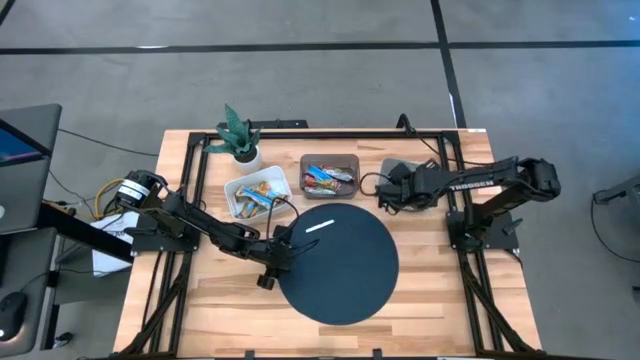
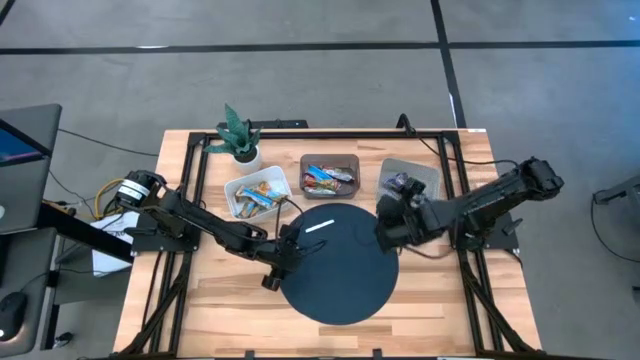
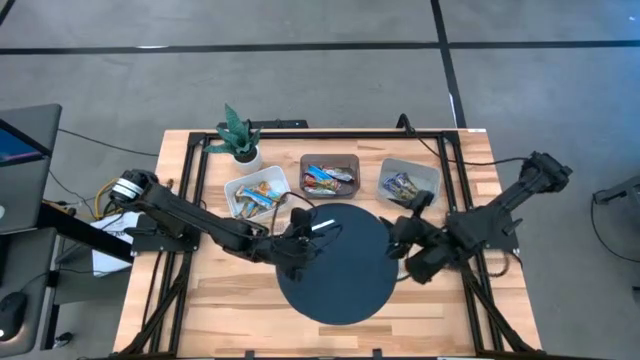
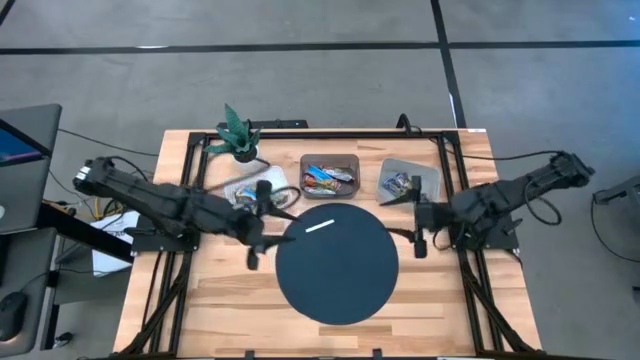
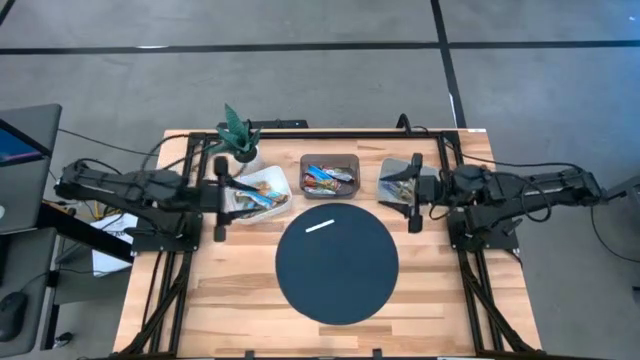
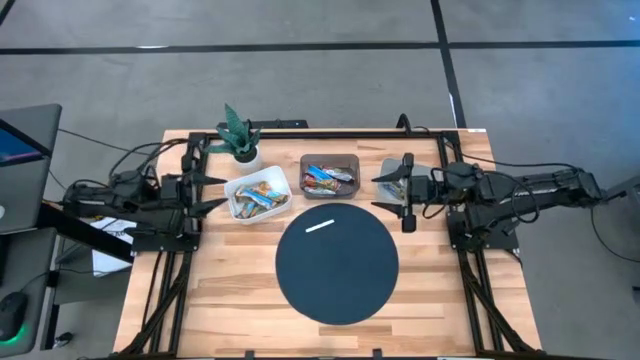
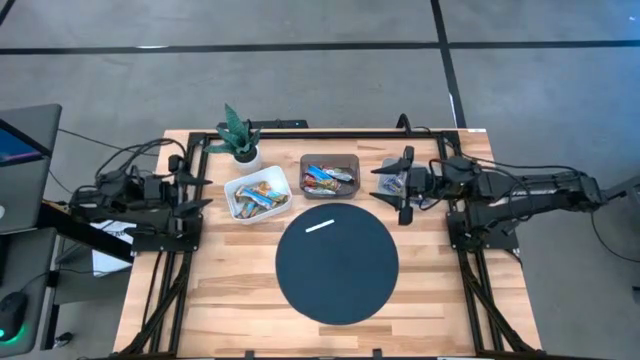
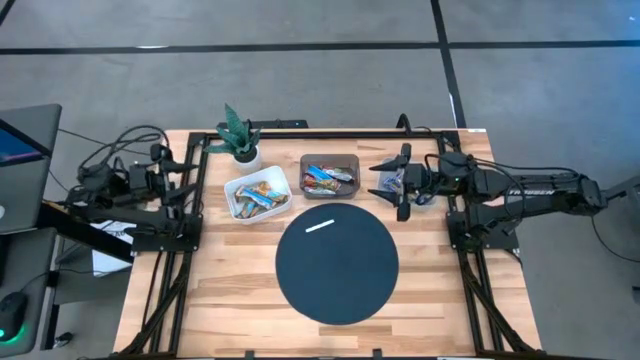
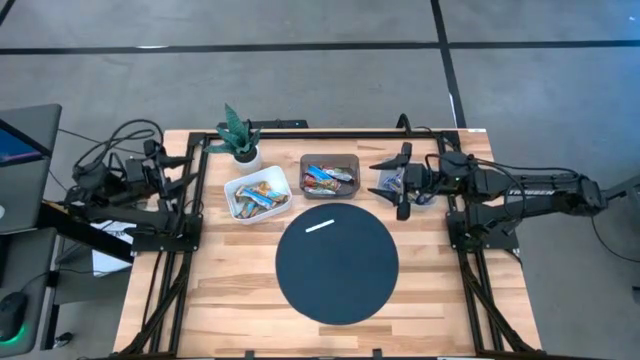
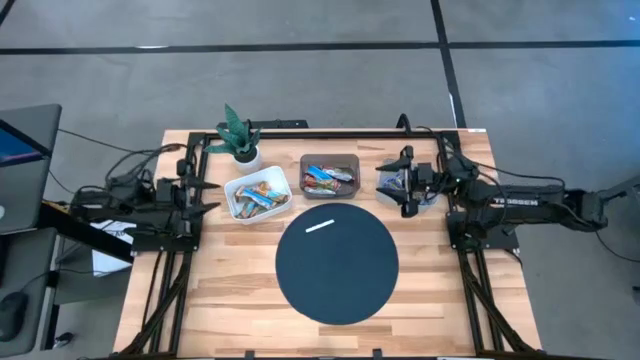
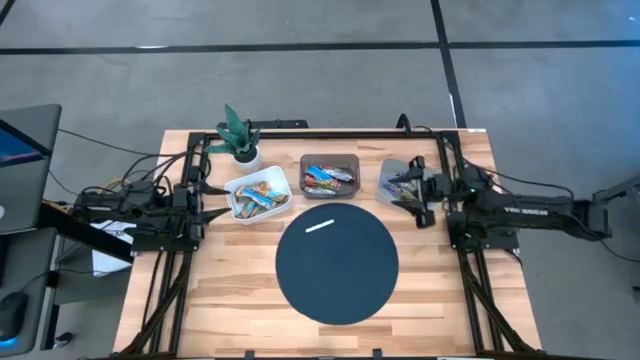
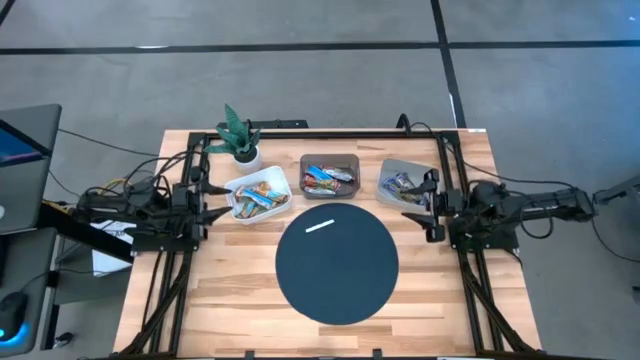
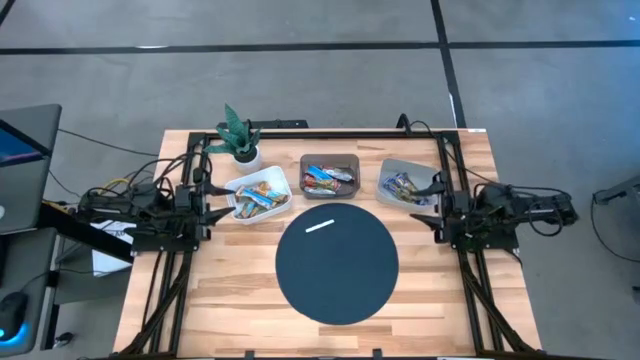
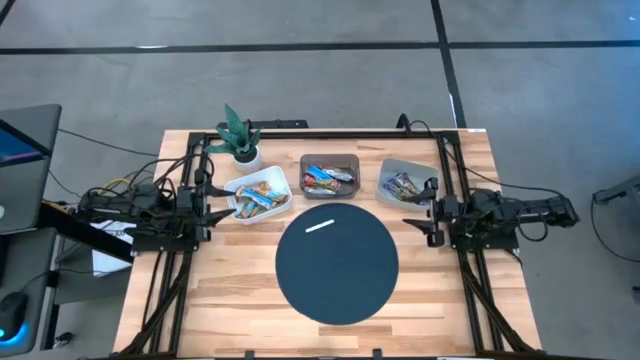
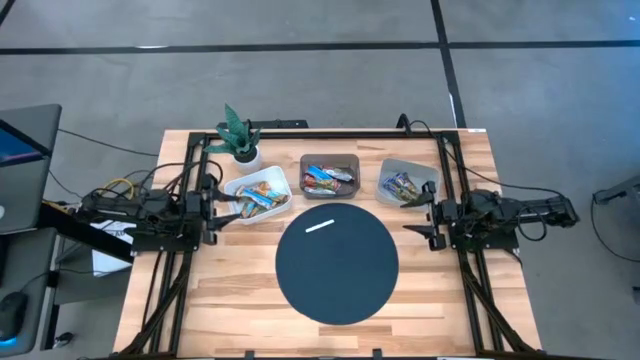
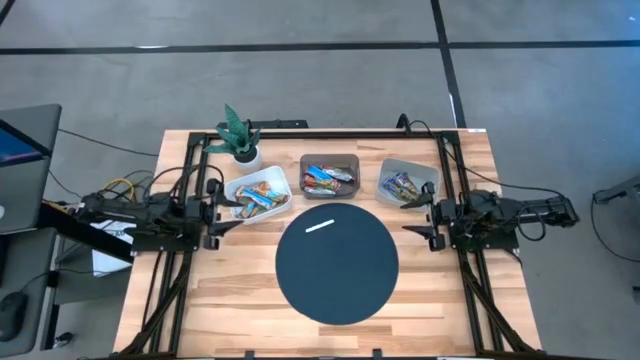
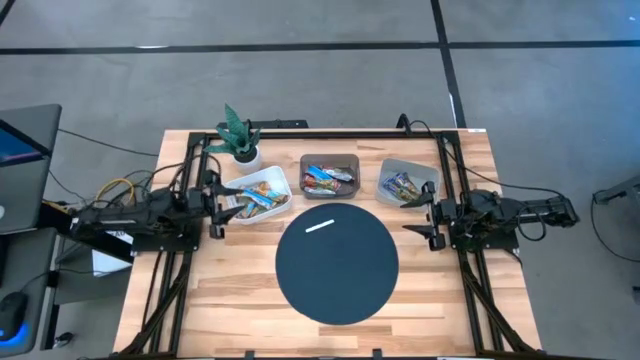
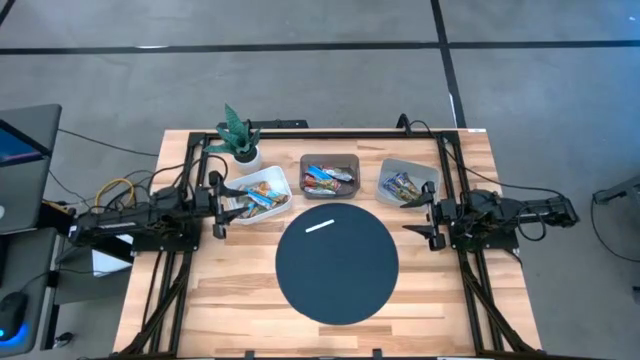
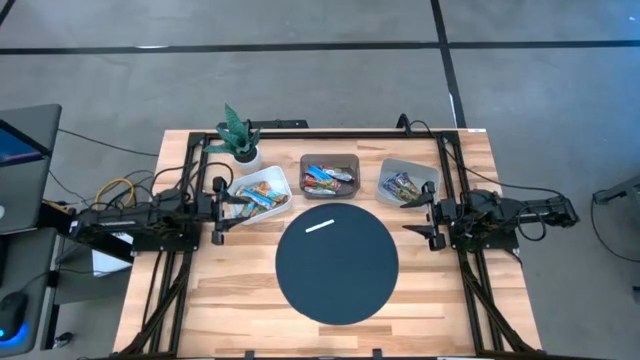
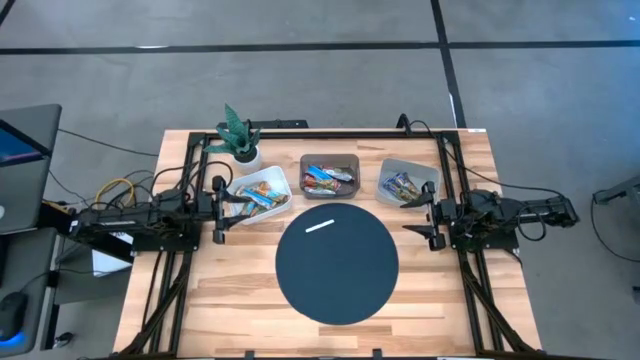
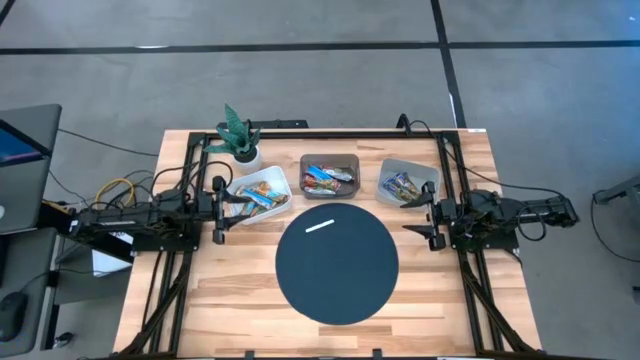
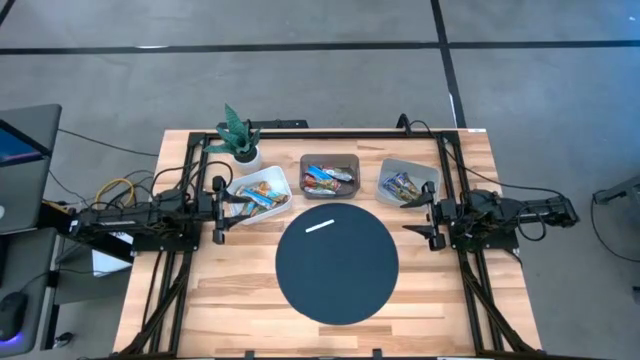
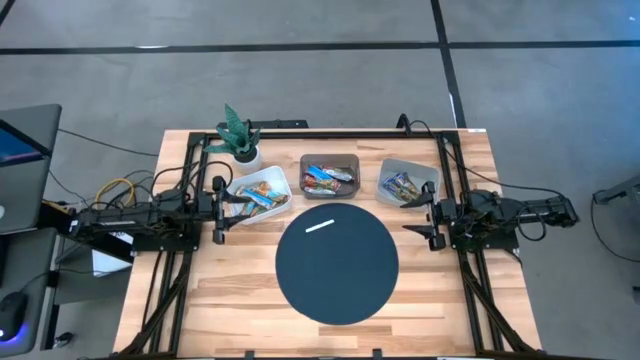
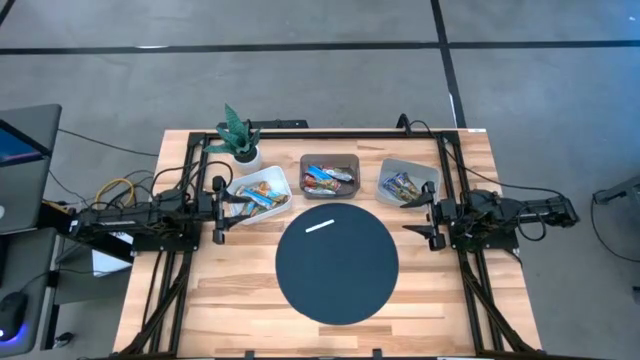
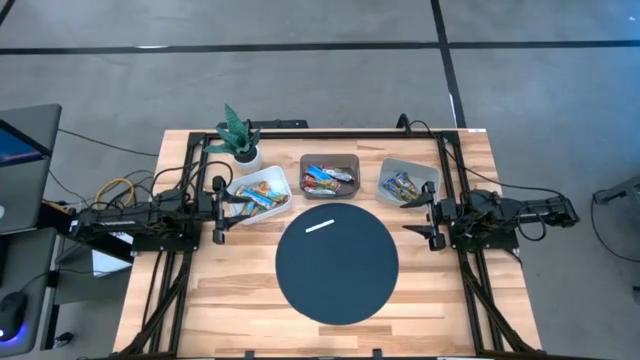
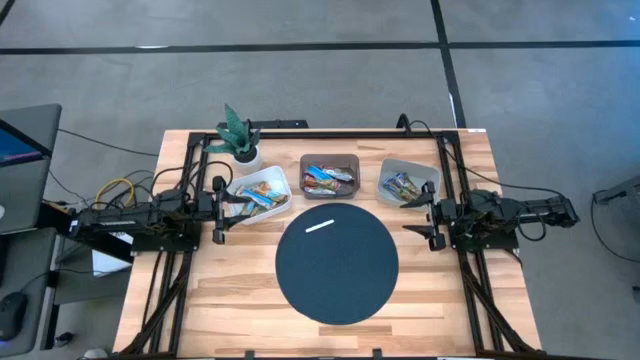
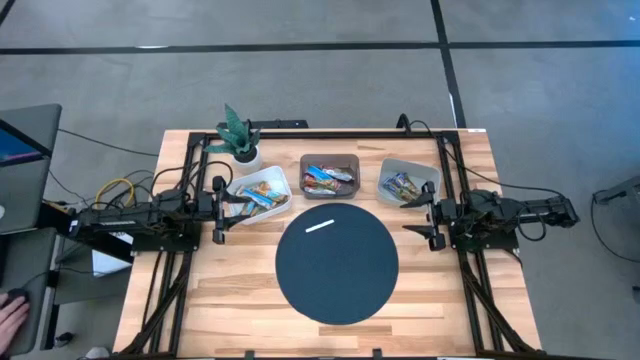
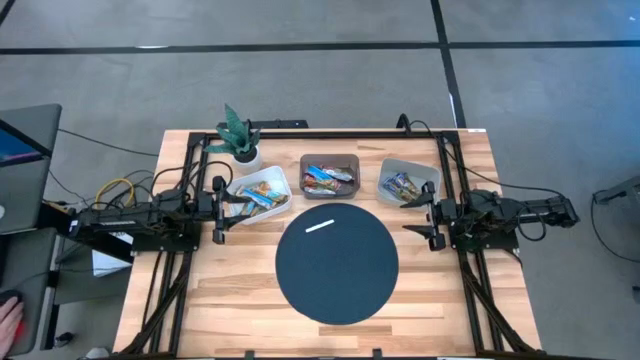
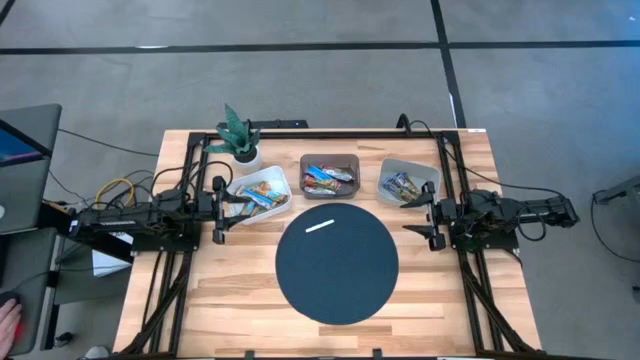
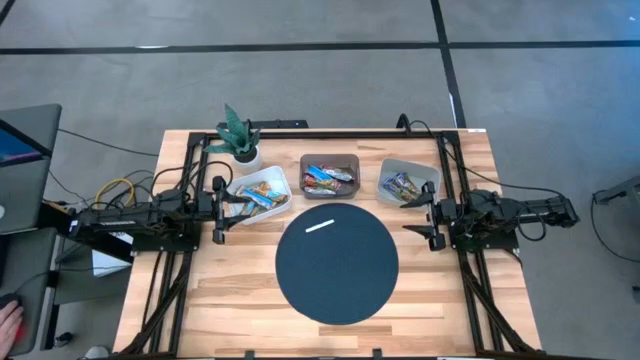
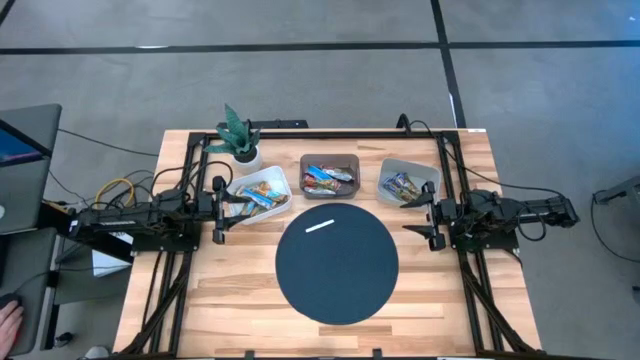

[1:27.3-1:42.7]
Task: Pick and place Granola Bars by type
Return to Home Position

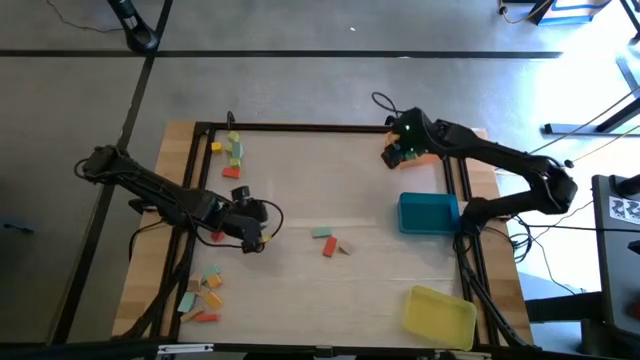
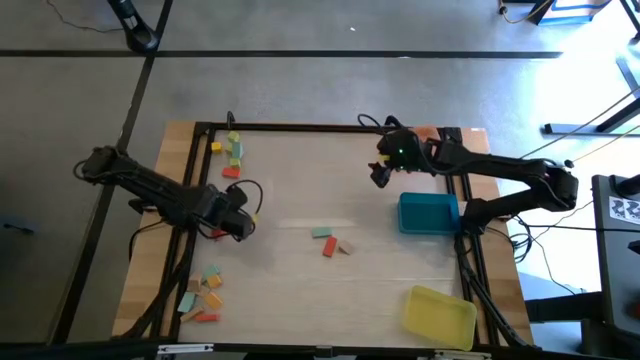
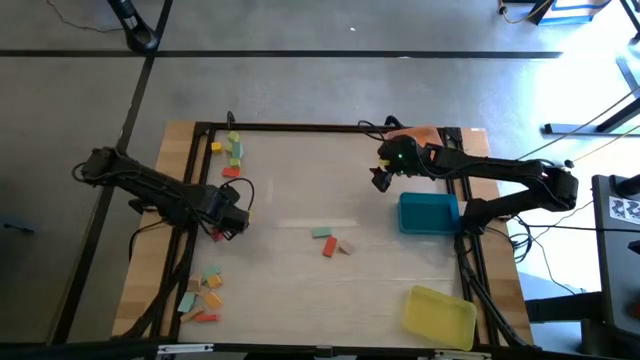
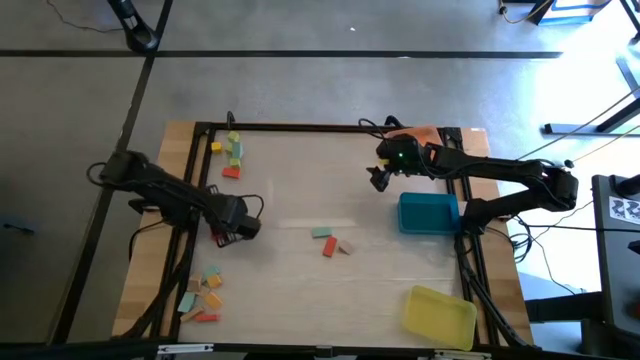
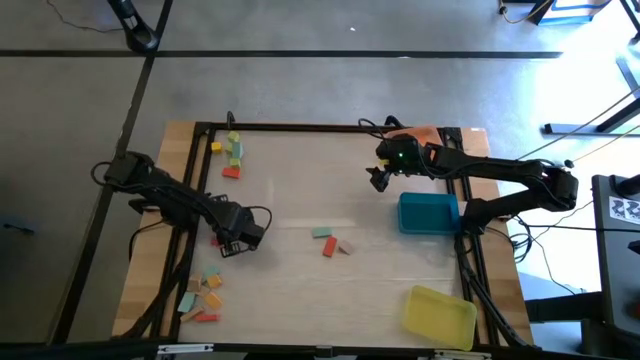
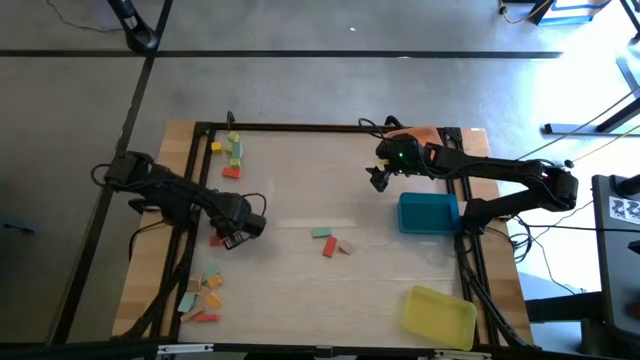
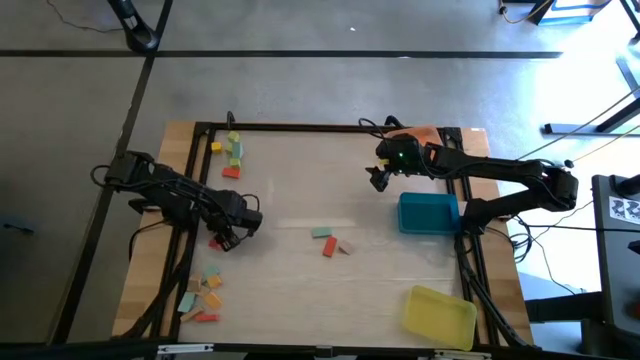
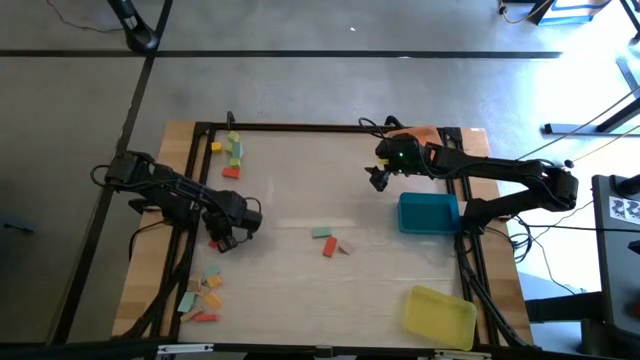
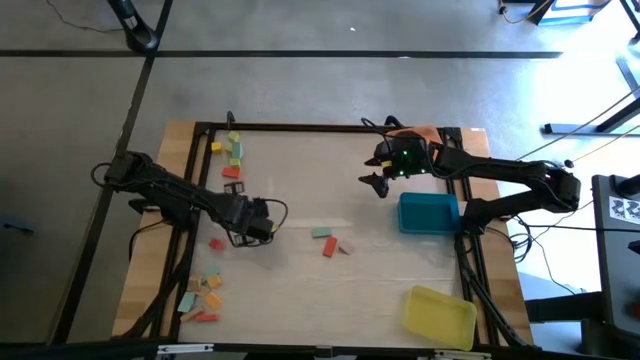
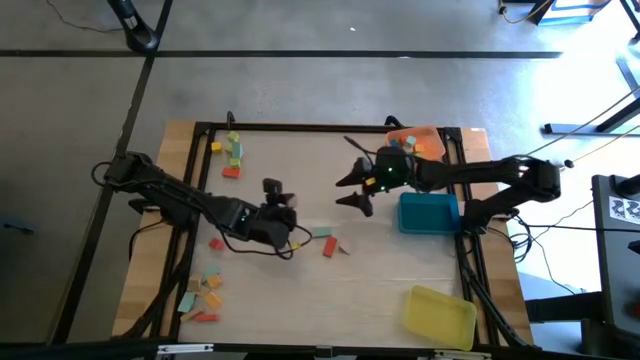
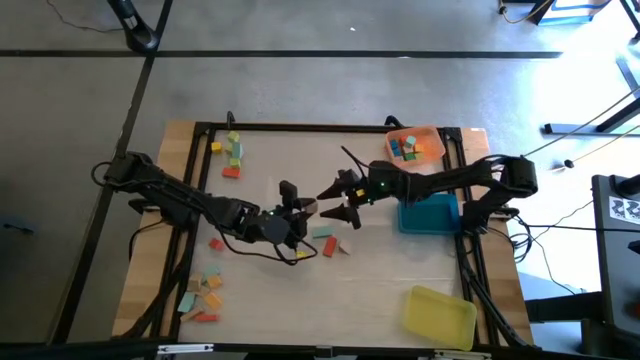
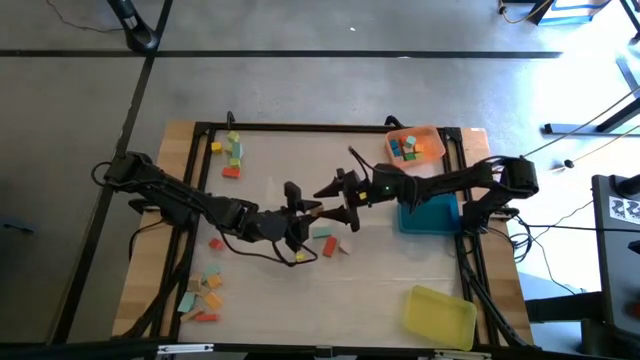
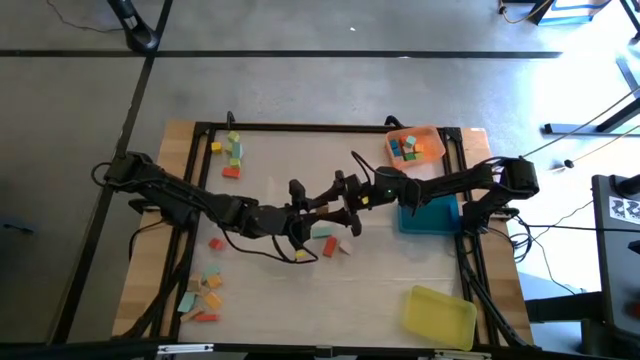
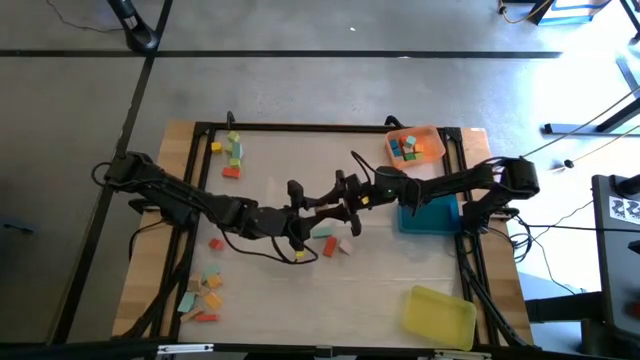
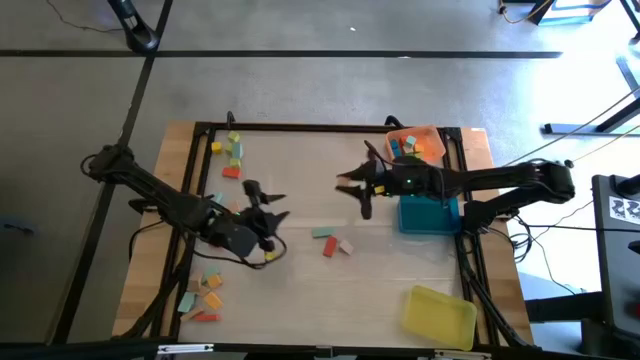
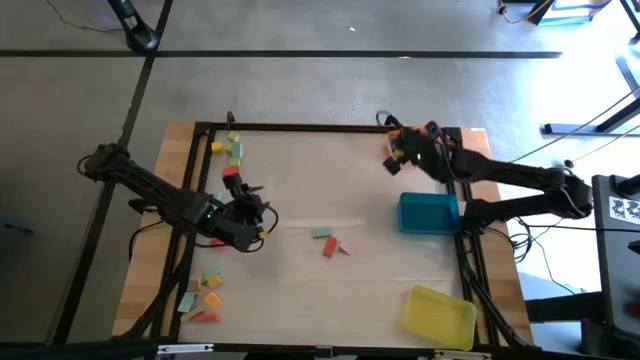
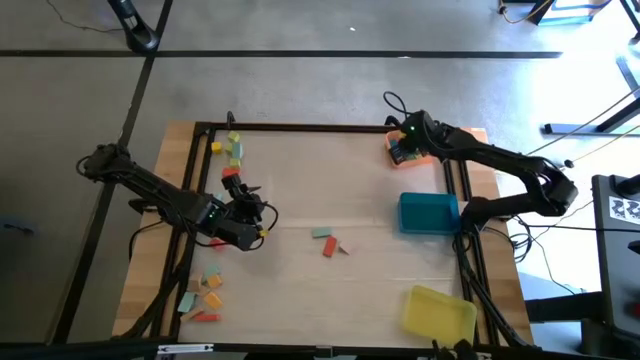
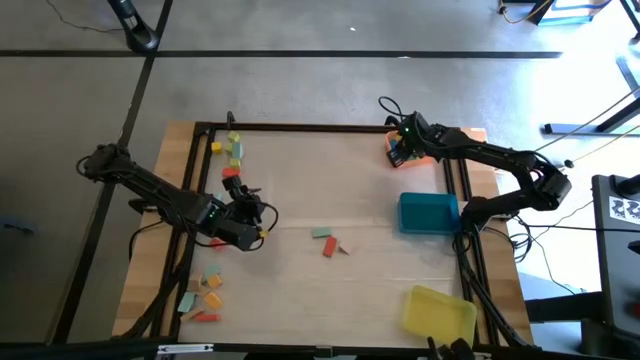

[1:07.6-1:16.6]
Task: Sort blocks by size
Put the brown cube block into the orange bin
